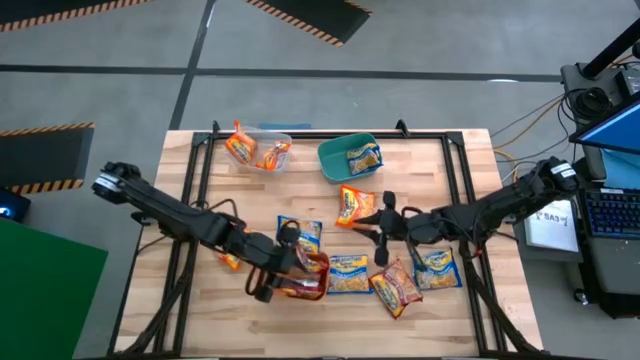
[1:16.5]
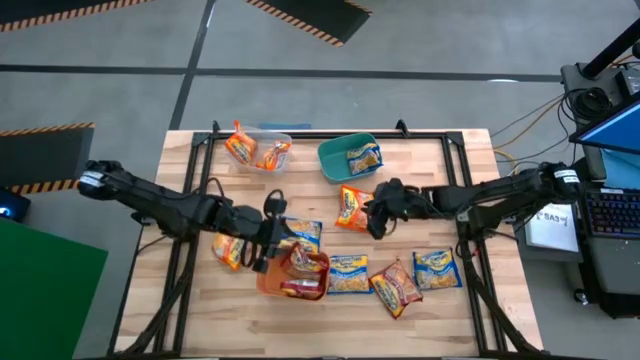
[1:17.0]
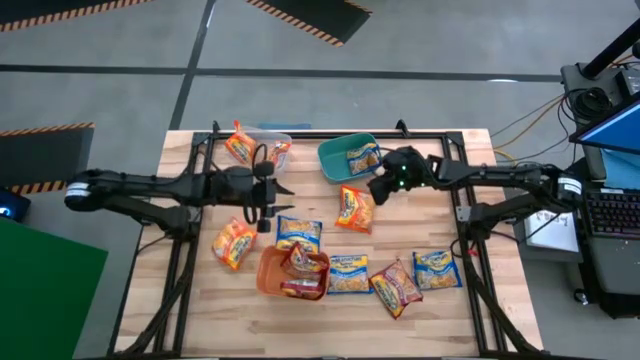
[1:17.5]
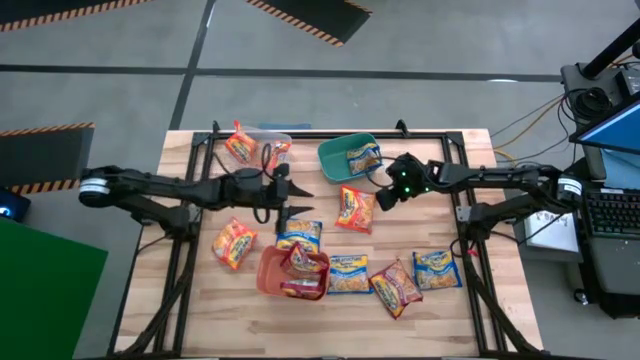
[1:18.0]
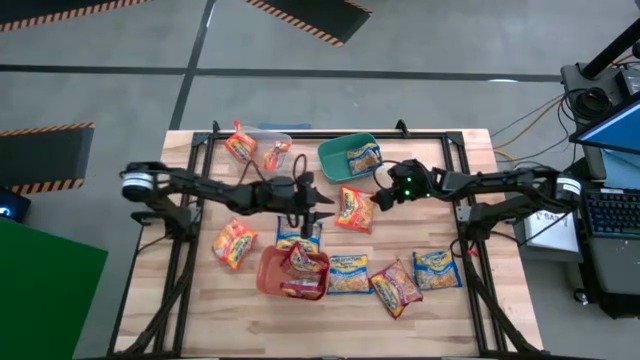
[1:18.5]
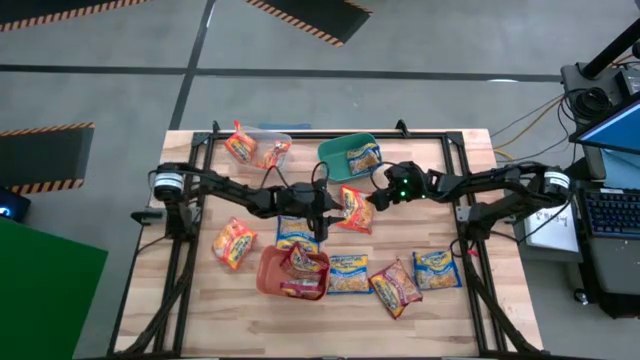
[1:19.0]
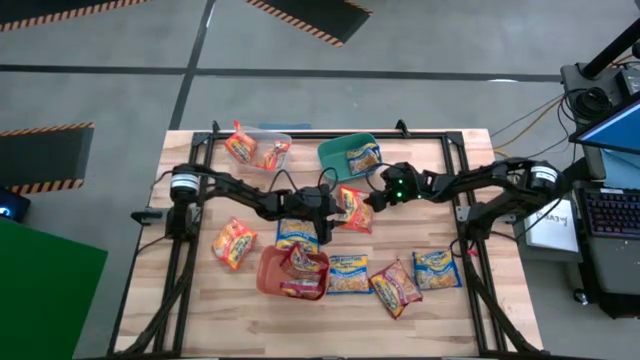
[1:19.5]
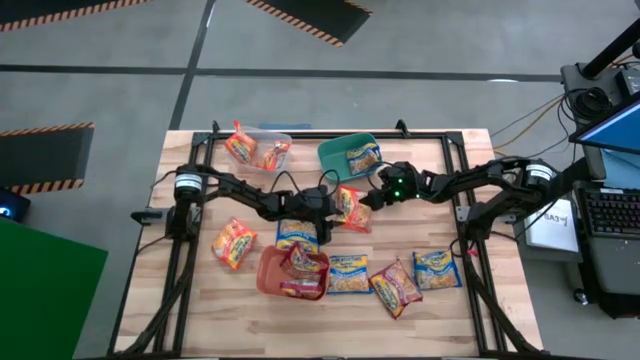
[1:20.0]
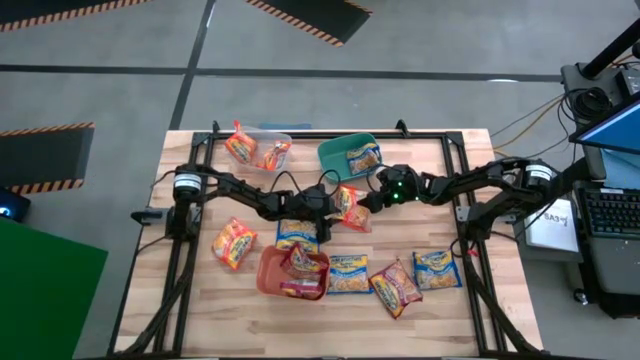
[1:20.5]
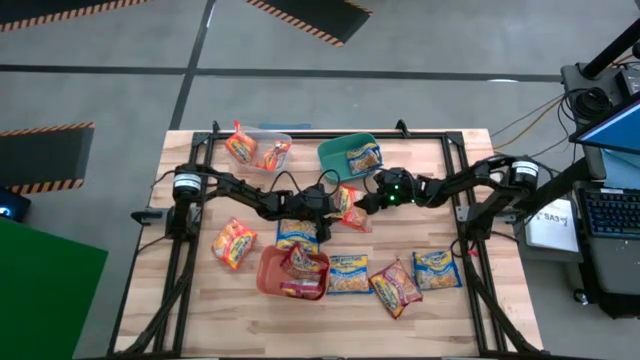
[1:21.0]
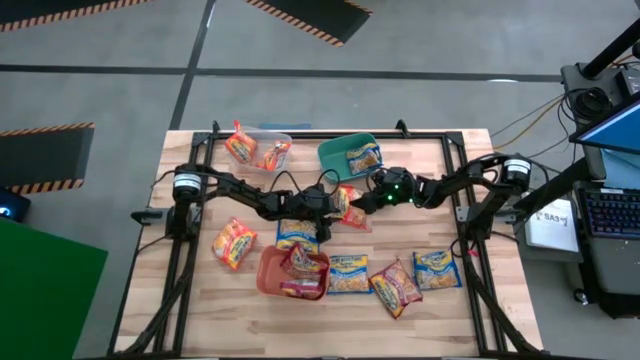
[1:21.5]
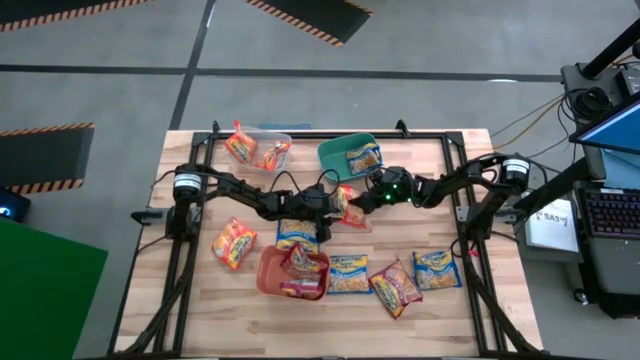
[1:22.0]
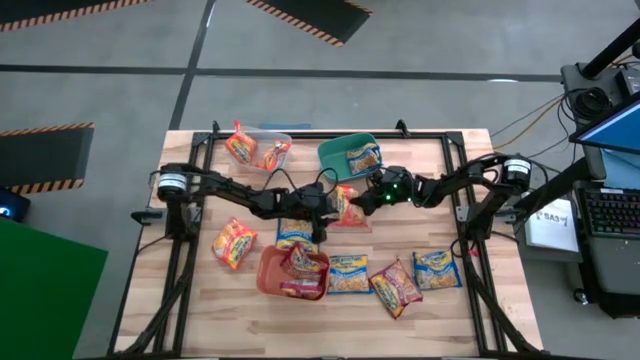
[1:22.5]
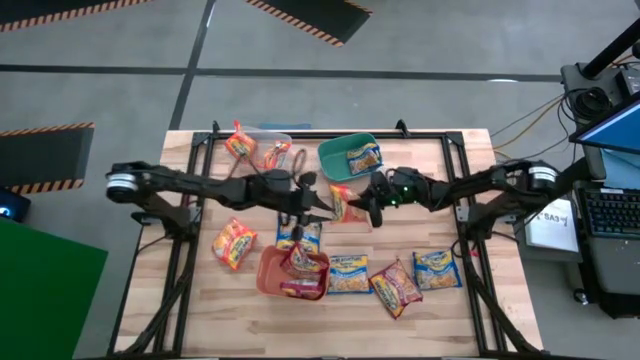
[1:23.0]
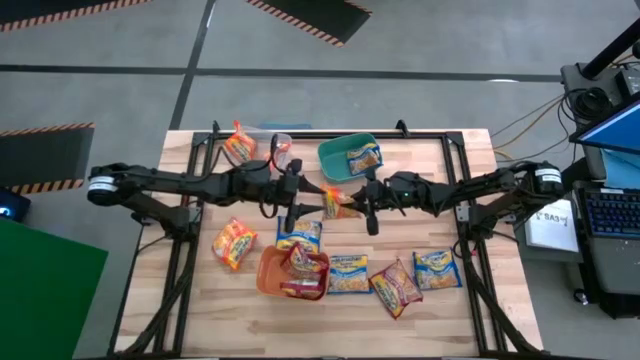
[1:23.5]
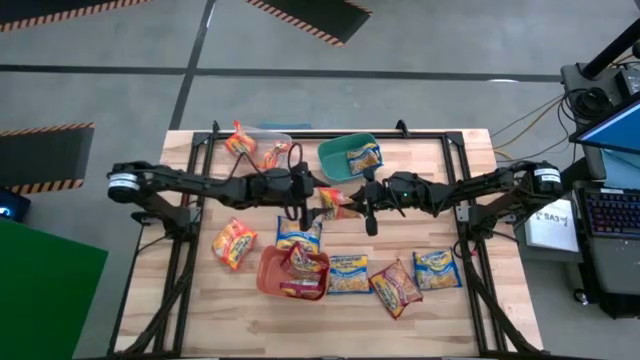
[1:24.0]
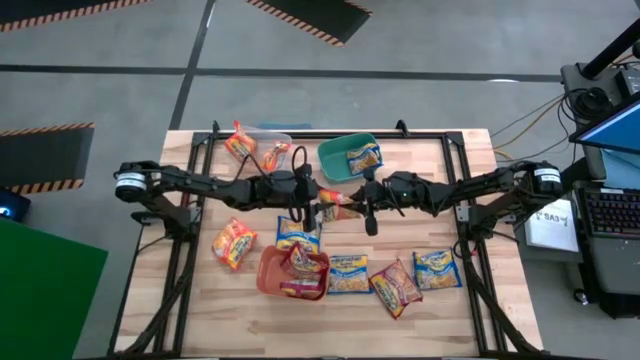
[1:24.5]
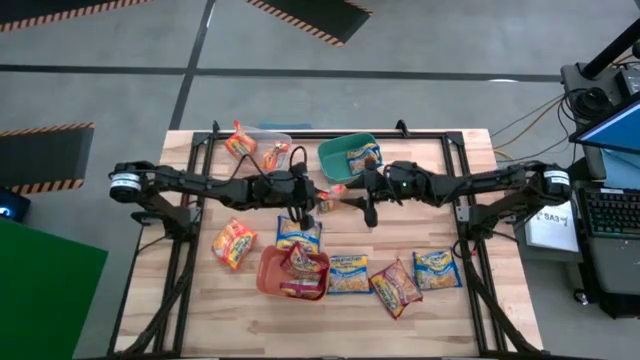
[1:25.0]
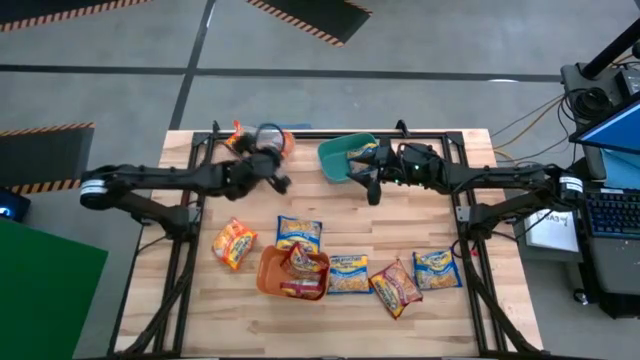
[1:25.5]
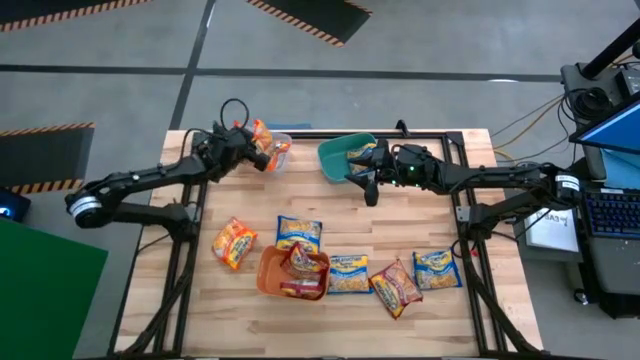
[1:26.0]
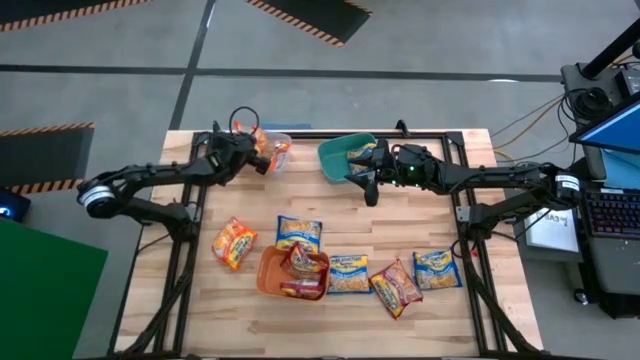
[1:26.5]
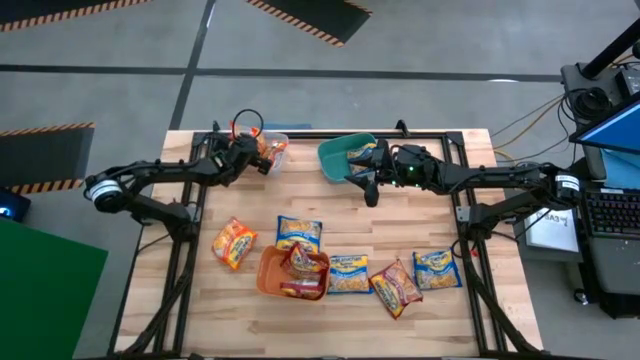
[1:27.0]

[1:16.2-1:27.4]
Task: Sort Maruchan noodles
Put the orange noodle pack into the transparent bin

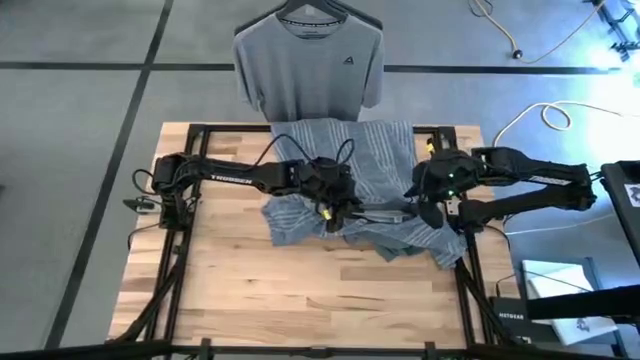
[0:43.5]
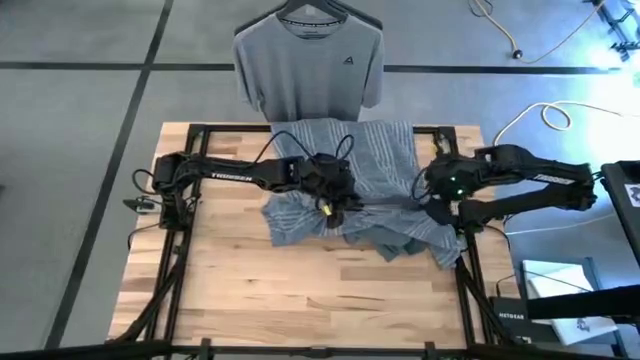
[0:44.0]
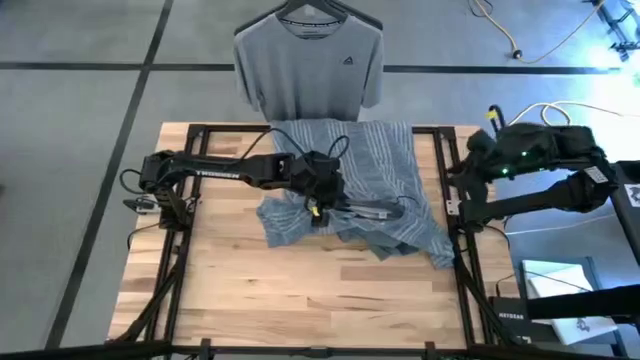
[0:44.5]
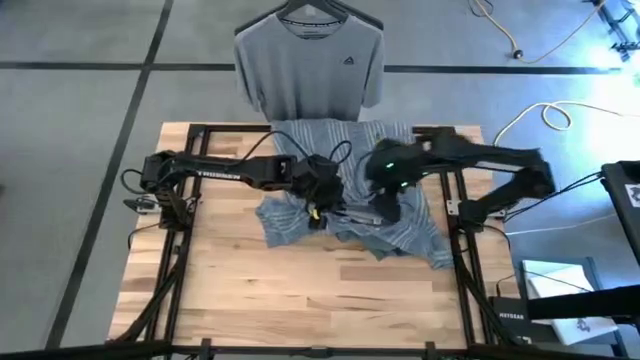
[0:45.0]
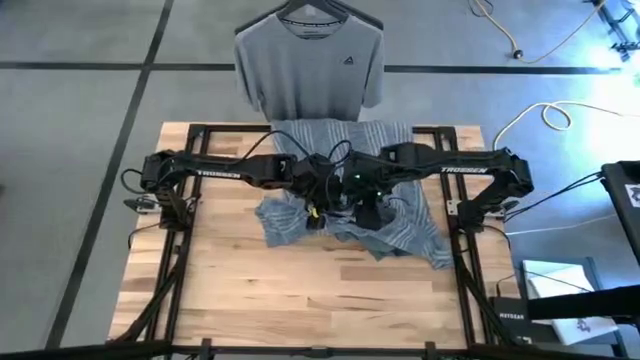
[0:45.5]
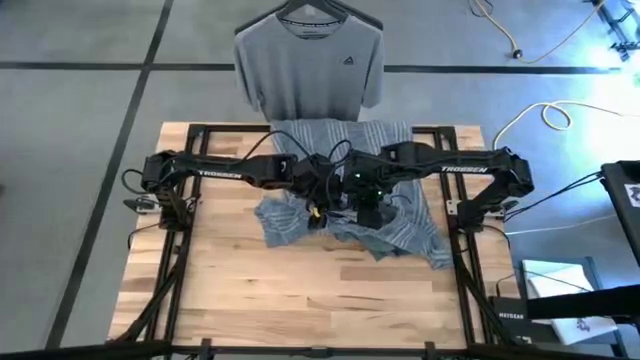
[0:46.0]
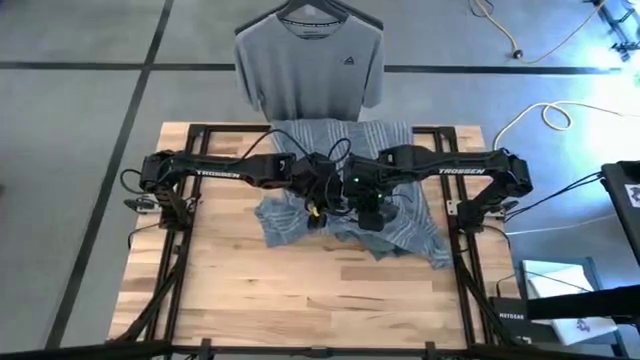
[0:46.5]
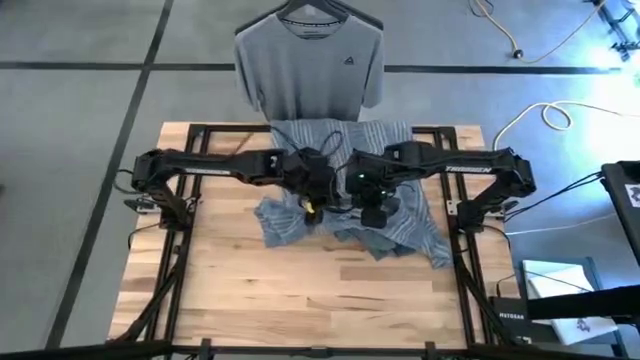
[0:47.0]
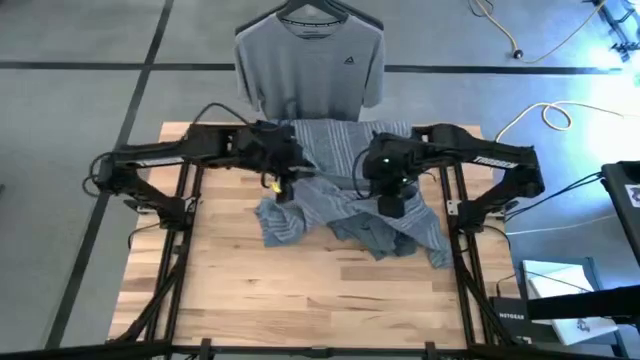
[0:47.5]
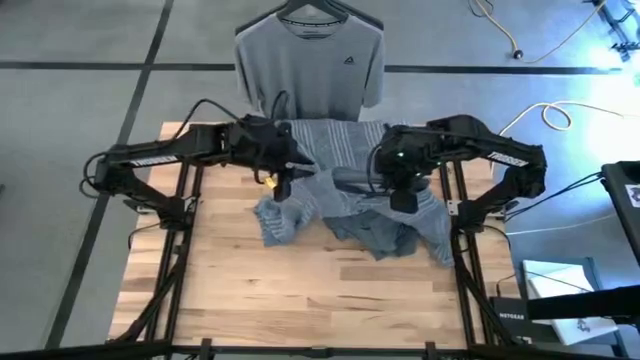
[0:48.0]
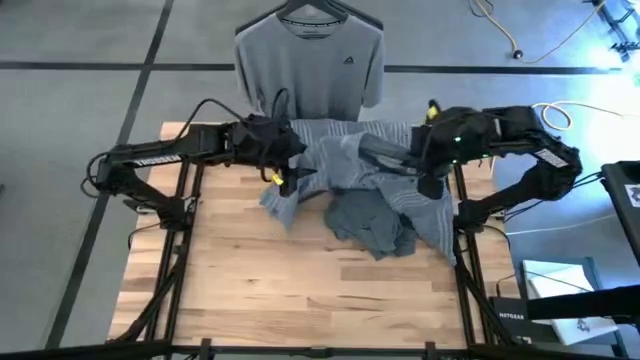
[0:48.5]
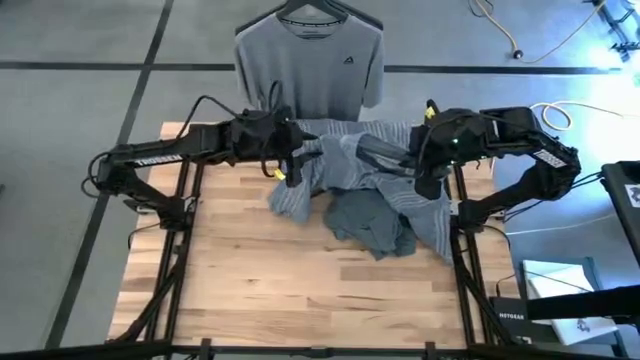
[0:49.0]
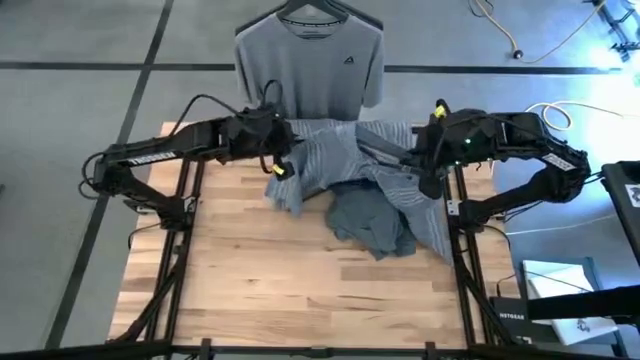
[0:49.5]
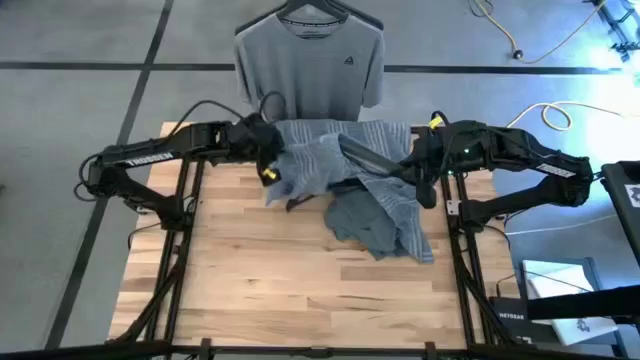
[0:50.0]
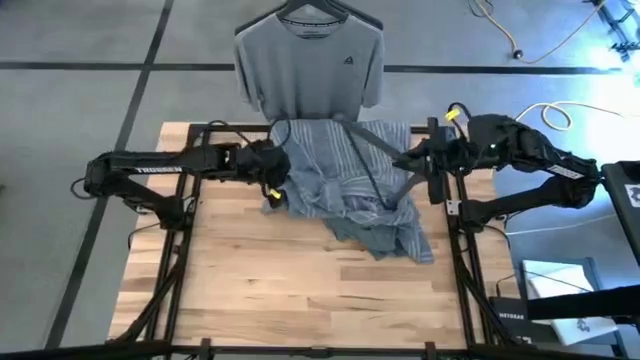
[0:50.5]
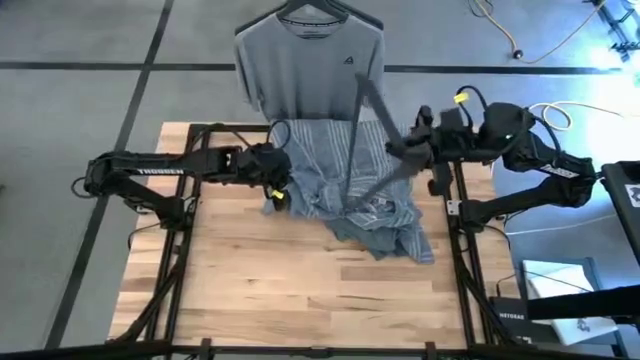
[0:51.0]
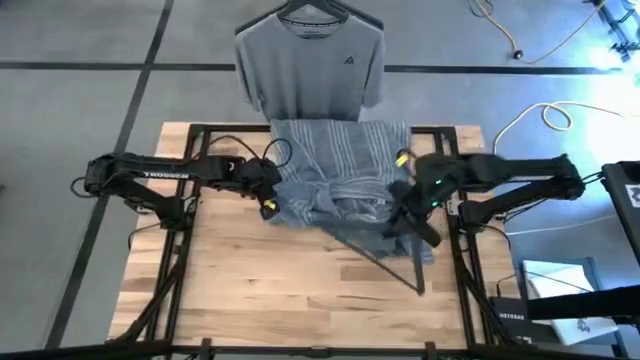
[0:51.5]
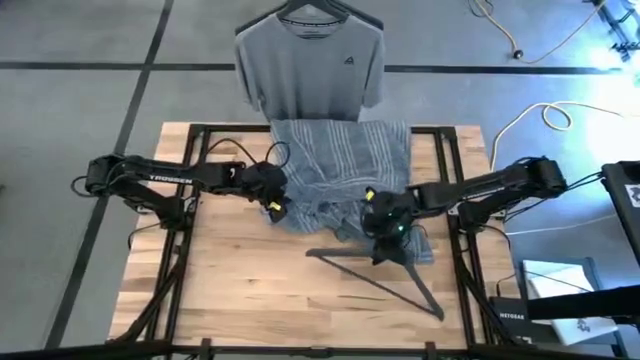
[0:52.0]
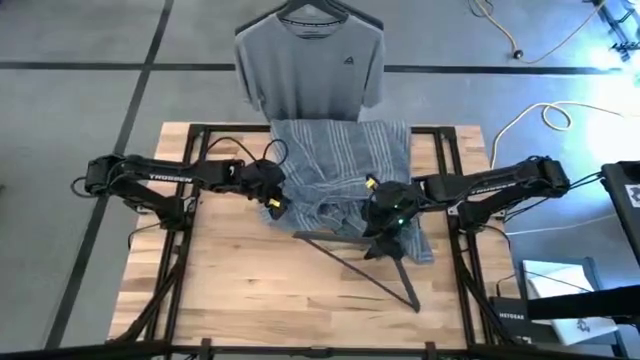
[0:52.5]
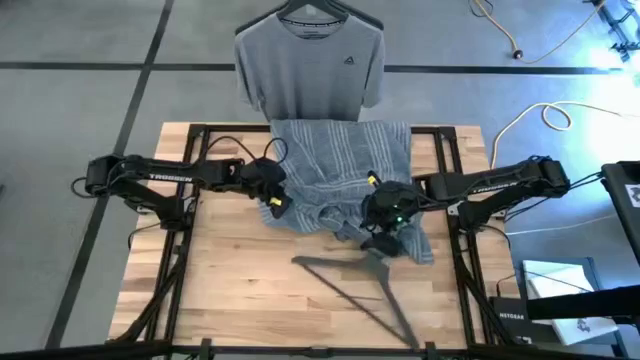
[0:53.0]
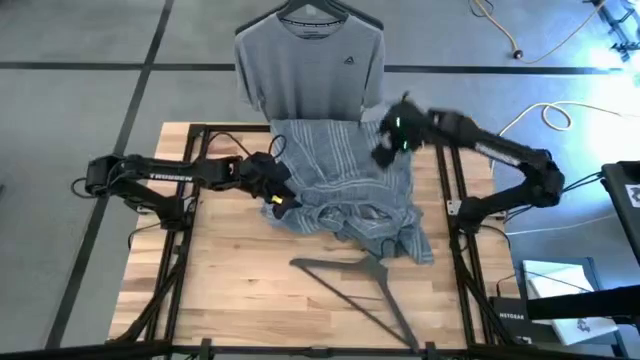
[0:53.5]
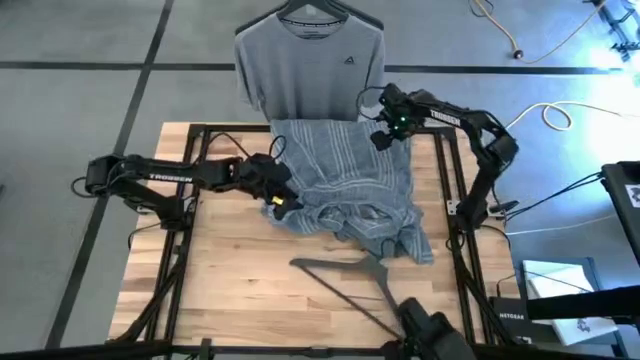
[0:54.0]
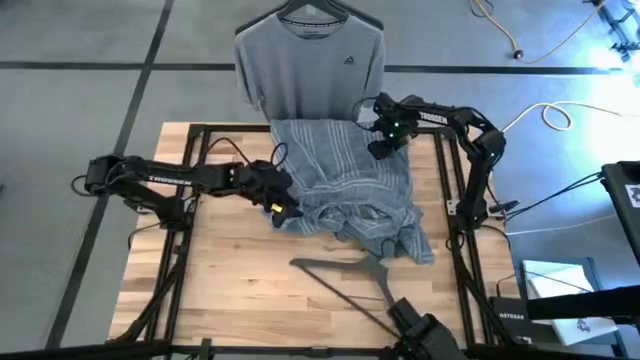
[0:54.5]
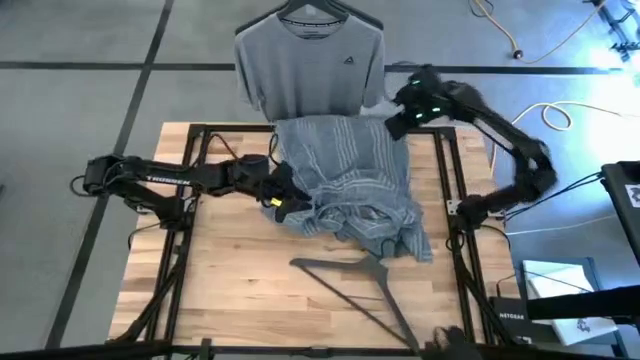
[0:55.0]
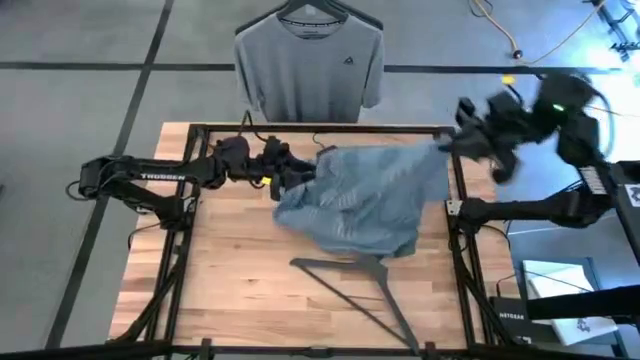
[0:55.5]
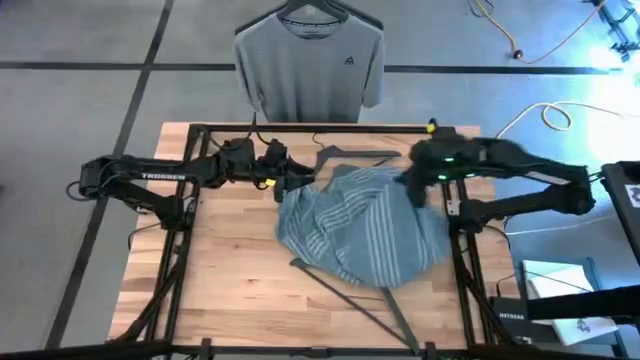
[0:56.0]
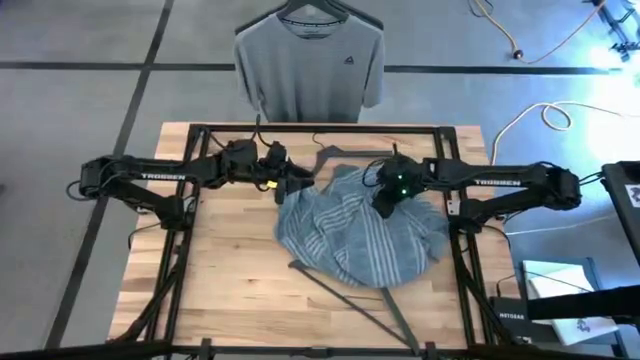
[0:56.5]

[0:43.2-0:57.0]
Task: Unhang clothes
Remove the polo shirt from the hanger
